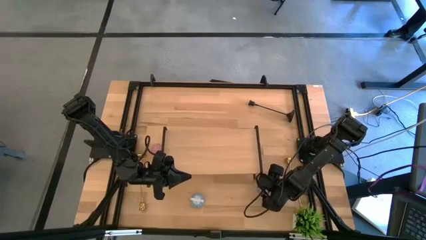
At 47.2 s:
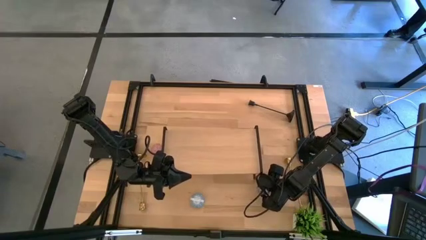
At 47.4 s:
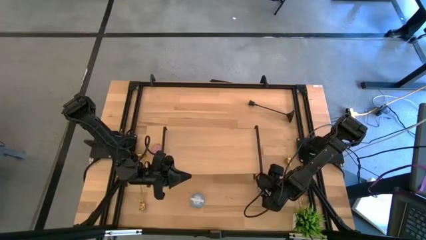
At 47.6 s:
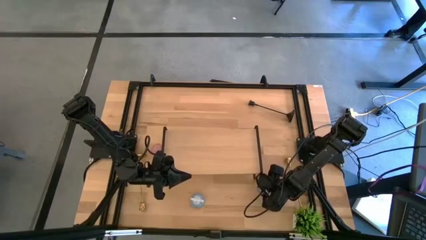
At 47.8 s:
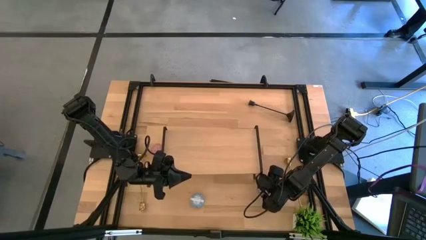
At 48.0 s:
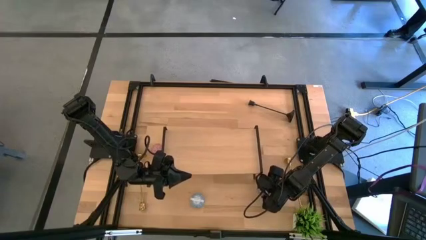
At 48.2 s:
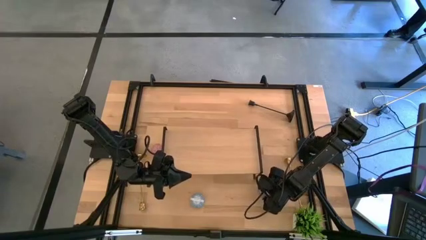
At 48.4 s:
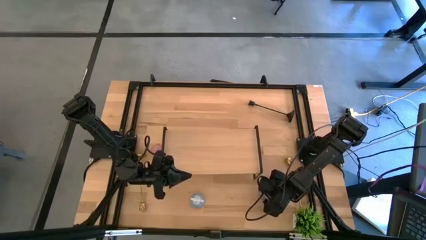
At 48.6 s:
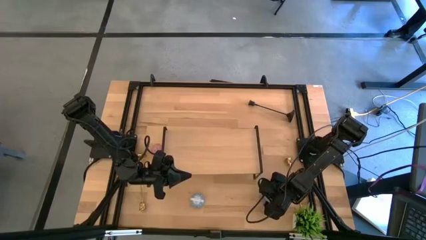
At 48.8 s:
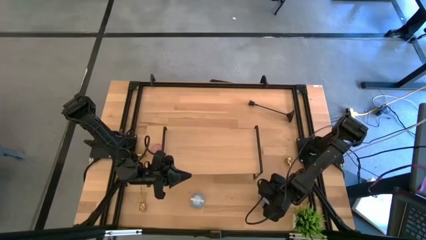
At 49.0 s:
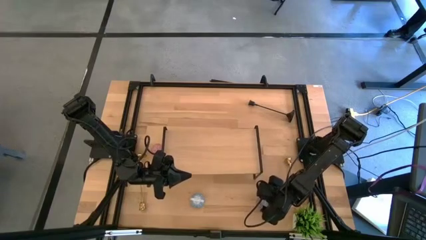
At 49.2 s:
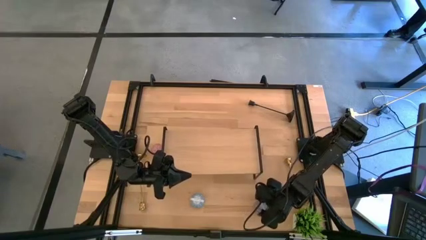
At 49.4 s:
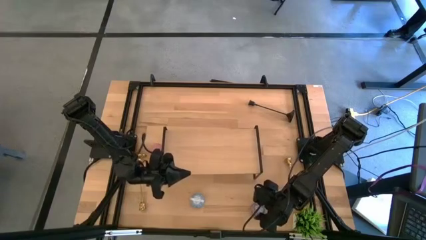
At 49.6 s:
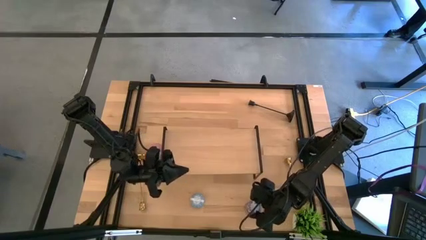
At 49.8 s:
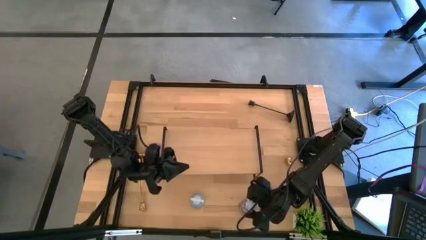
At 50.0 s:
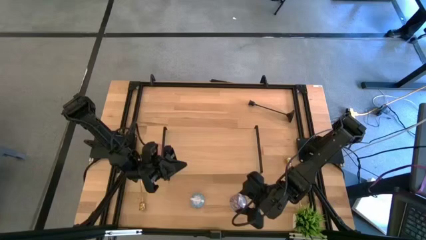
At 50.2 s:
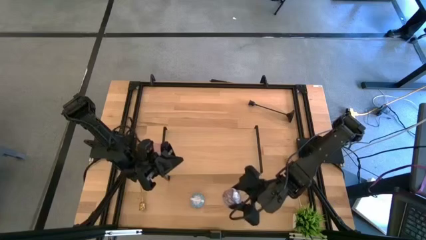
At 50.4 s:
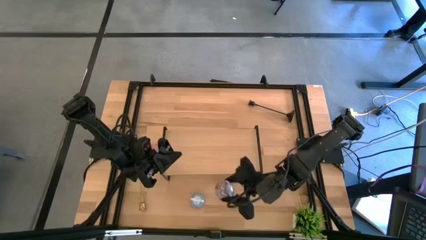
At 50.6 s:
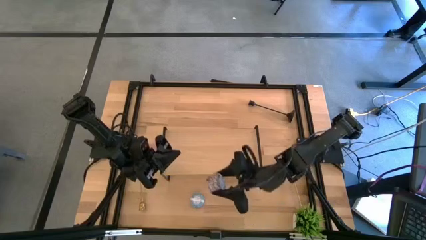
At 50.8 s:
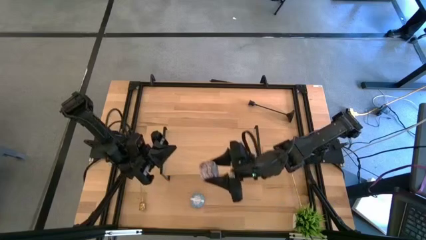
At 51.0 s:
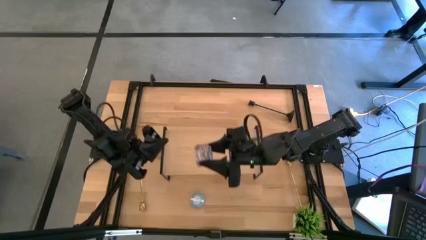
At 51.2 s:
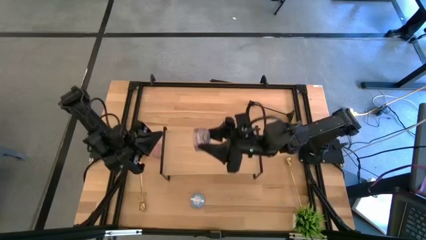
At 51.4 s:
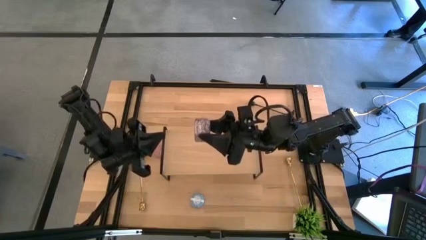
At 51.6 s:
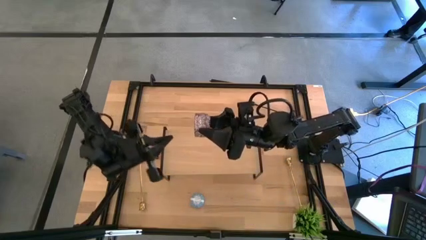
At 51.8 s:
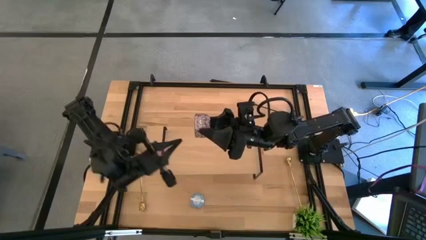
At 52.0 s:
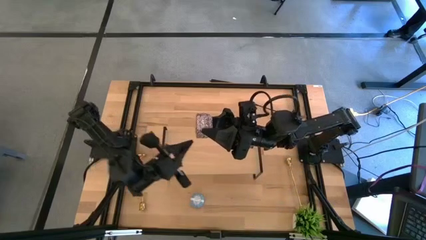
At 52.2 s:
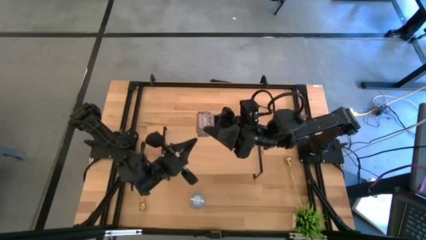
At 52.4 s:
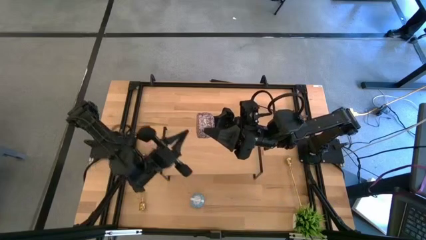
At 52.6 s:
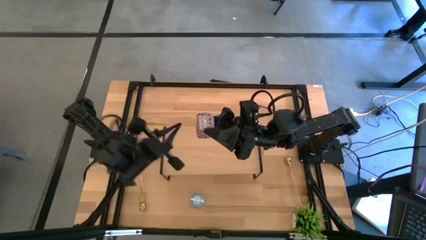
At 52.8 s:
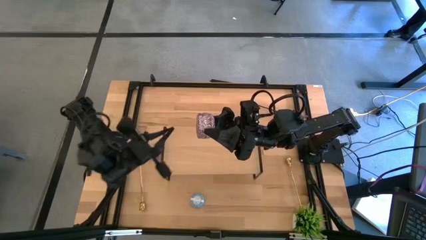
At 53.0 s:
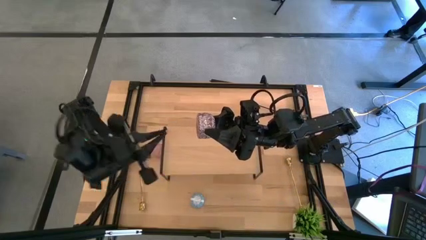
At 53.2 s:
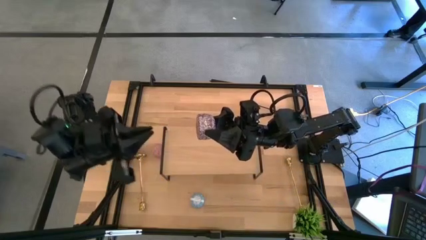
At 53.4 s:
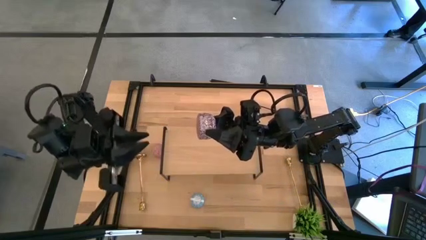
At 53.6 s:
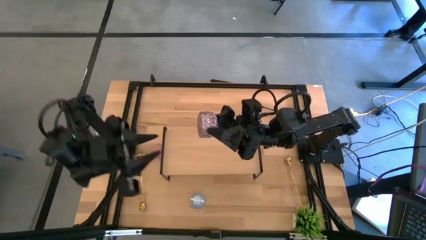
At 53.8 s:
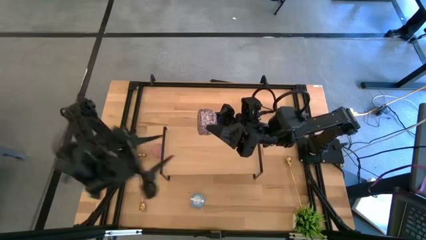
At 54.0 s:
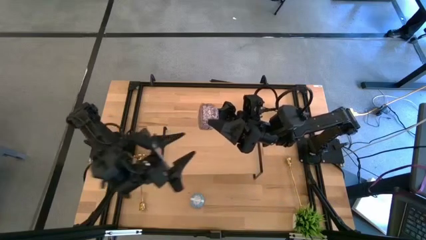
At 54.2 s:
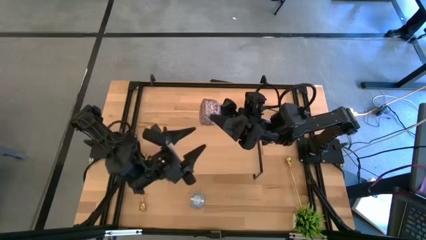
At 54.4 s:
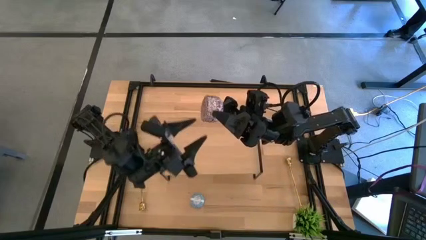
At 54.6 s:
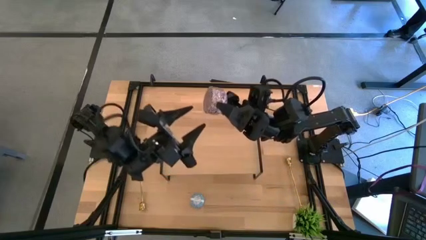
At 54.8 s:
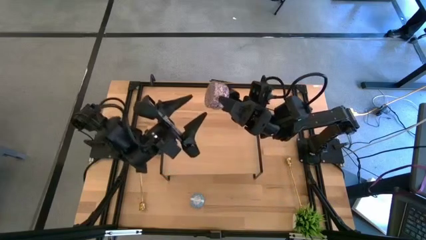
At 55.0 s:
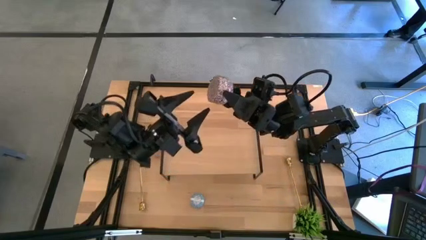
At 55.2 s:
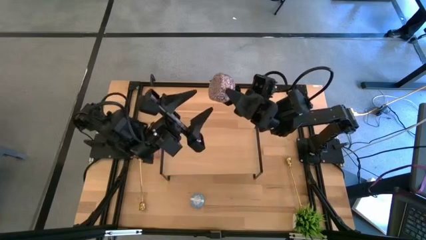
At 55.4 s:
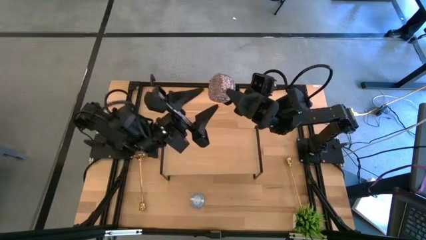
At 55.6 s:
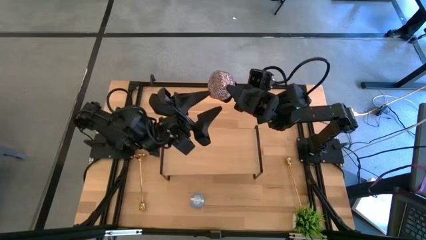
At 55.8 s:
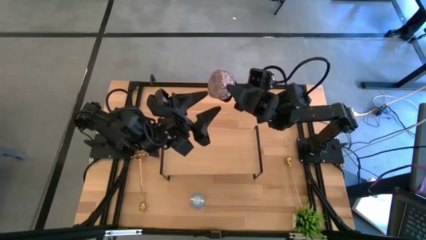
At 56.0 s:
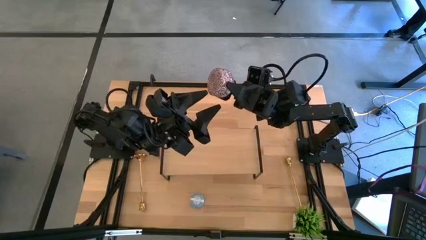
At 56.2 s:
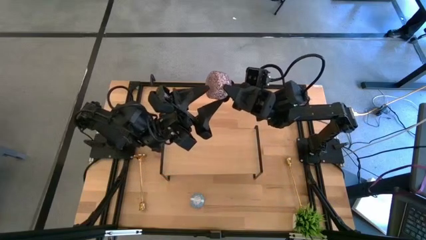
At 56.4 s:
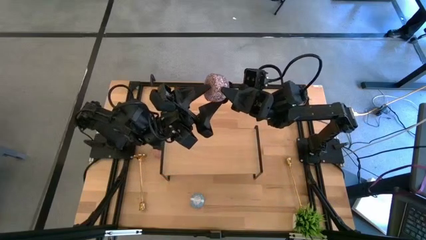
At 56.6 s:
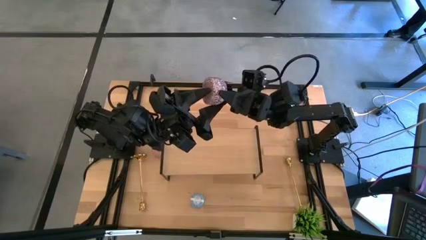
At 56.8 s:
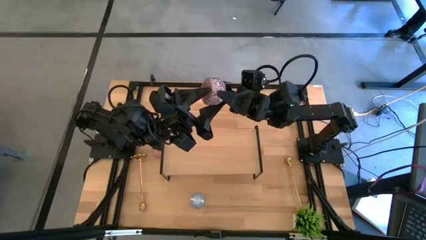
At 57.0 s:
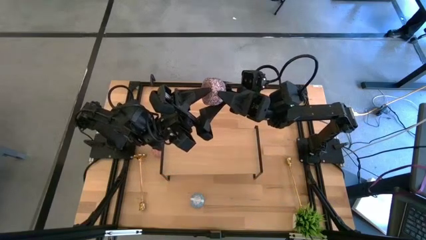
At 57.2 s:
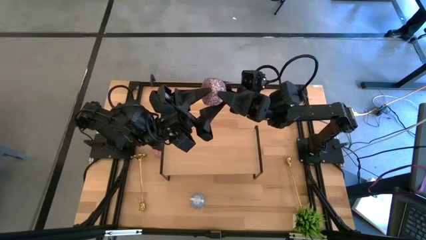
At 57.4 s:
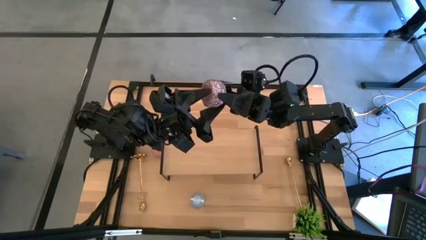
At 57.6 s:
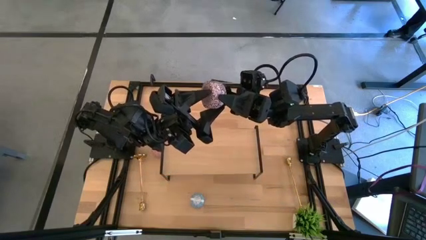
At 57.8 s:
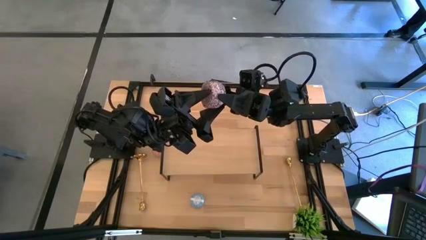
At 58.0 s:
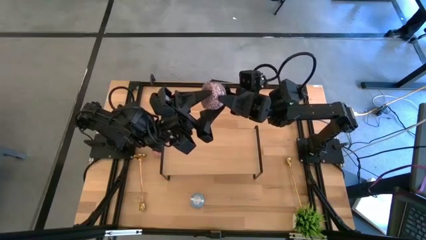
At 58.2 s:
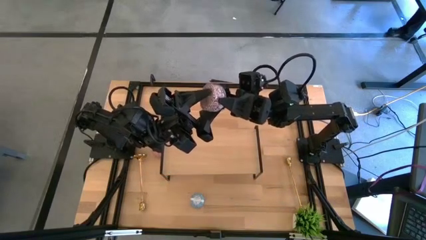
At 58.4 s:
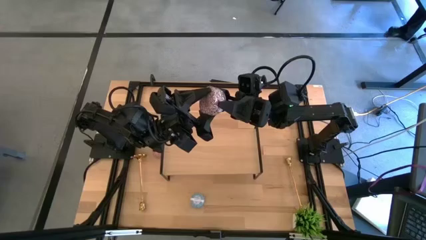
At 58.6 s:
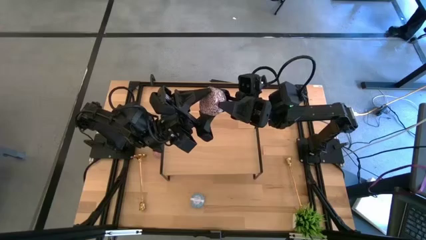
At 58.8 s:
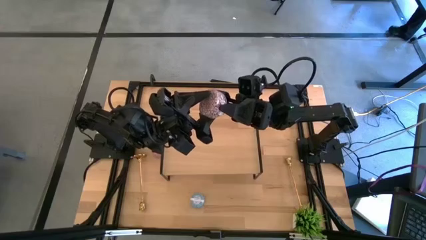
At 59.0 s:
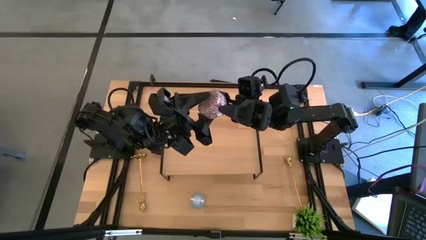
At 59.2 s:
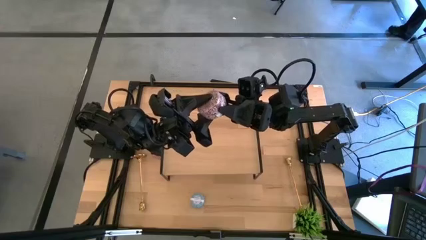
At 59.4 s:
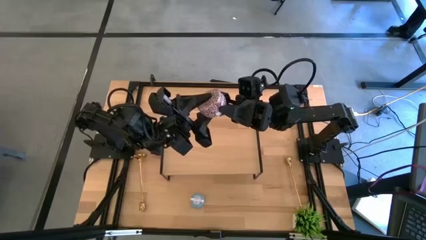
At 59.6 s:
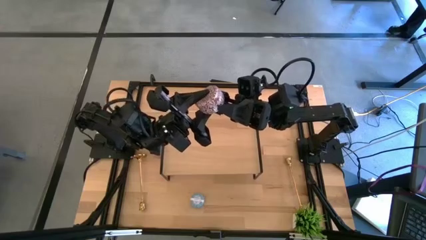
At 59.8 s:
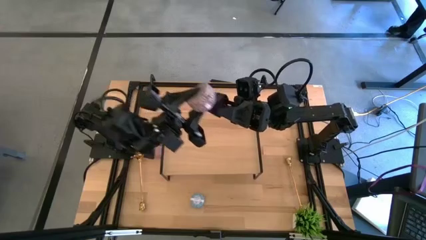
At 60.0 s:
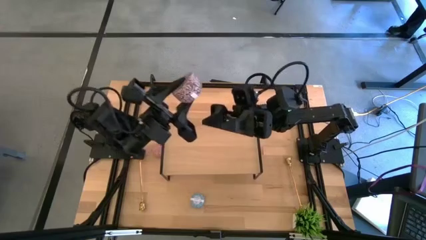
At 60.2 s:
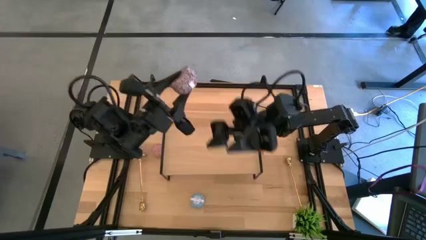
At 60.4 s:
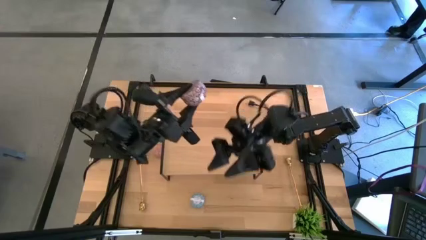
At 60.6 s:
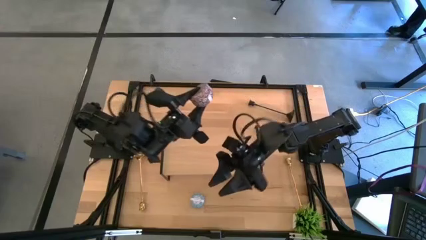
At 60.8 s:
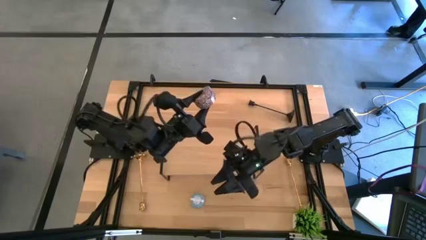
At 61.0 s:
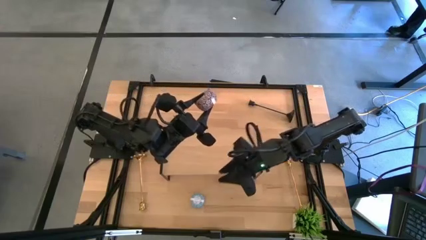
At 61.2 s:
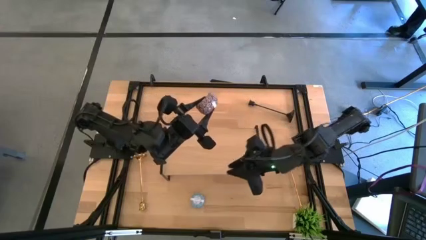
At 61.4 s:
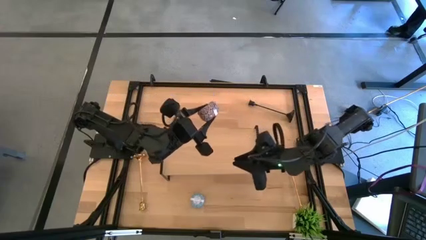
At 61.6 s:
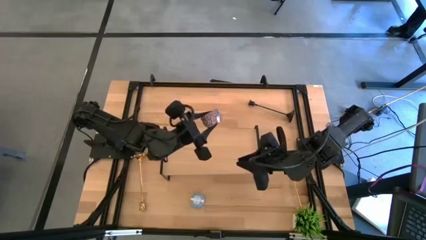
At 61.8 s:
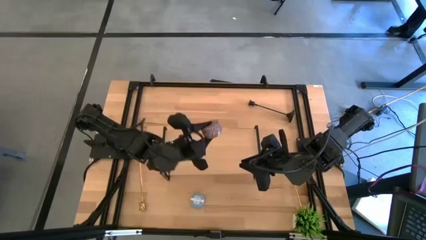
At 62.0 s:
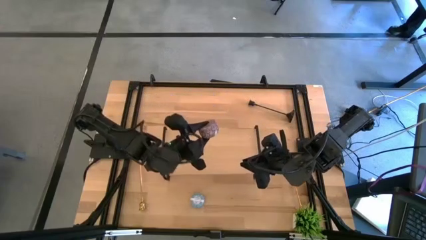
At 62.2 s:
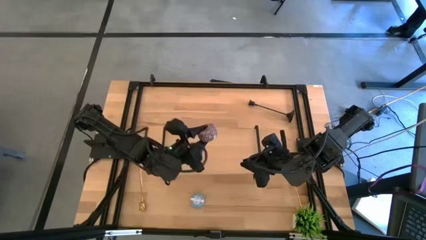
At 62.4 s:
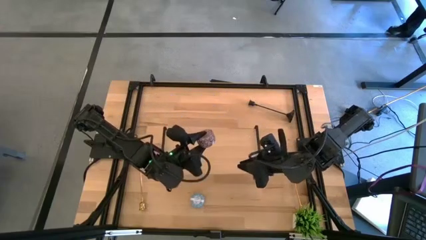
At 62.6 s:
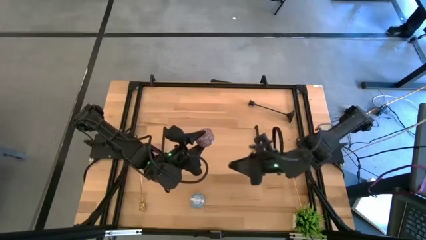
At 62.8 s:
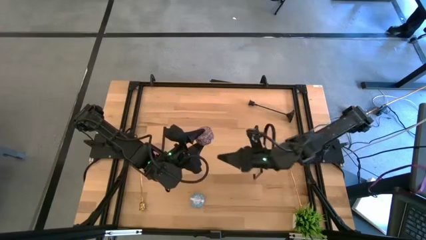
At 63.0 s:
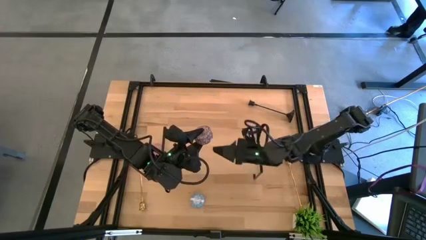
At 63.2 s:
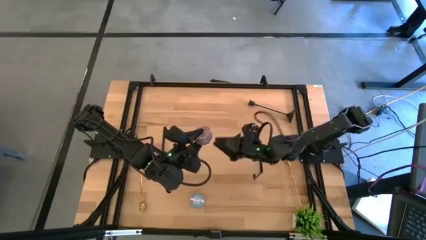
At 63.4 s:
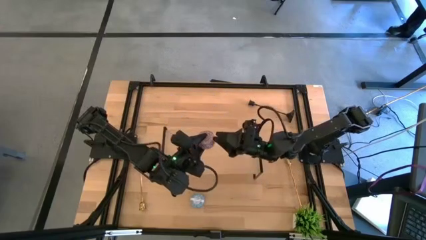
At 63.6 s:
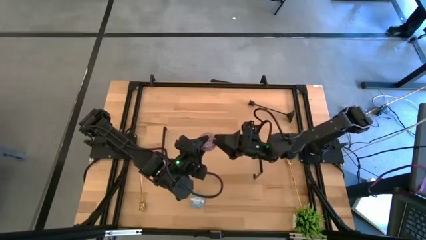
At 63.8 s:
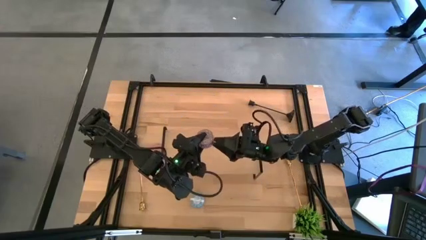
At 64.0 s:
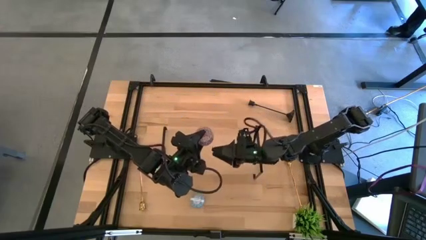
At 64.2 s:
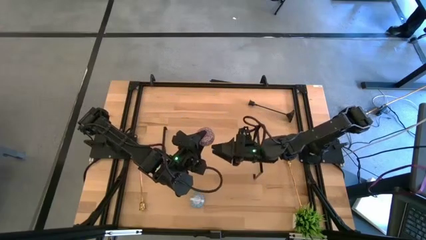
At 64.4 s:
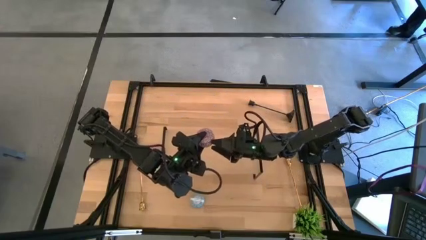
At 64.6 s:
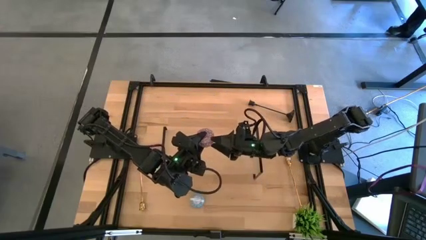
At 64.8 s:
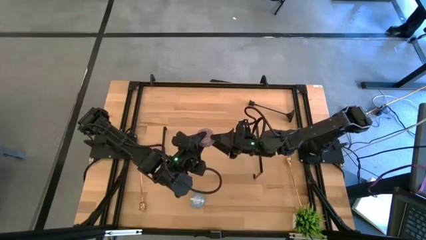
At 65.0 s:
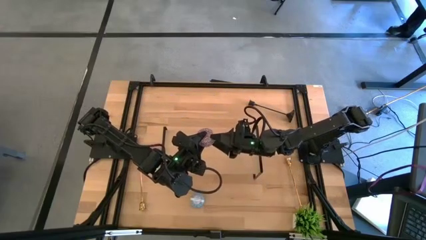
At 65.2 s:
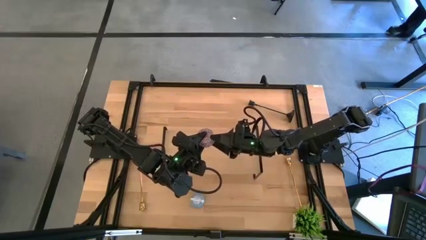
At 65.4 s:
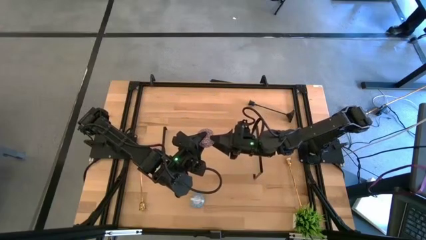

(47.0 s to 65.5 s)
Task: Pick & Place candle stick holders
Put the red scented candle on the shelf
